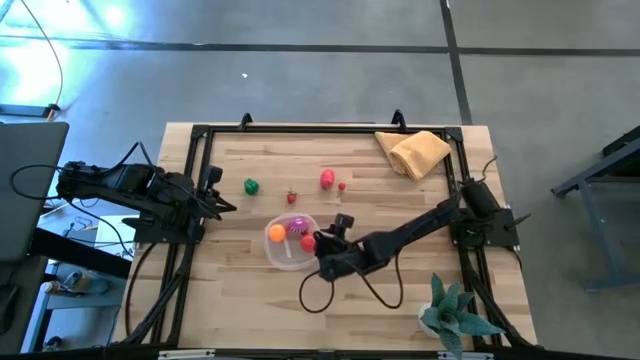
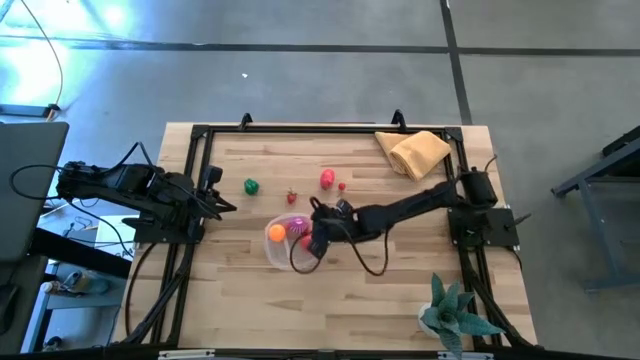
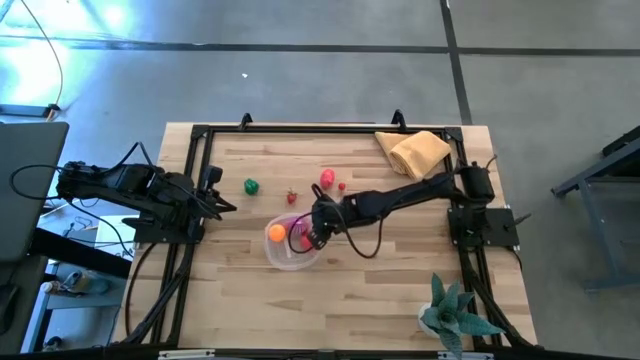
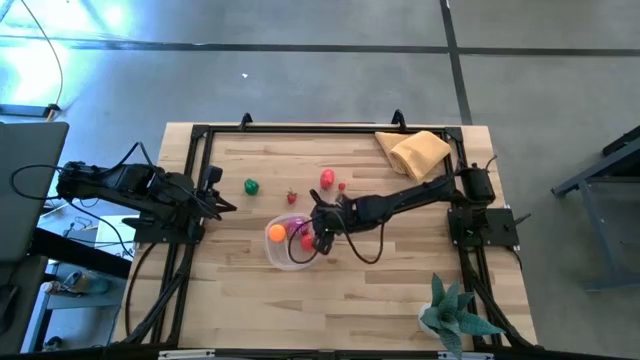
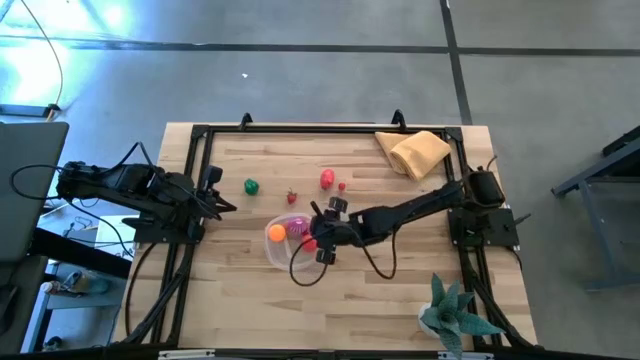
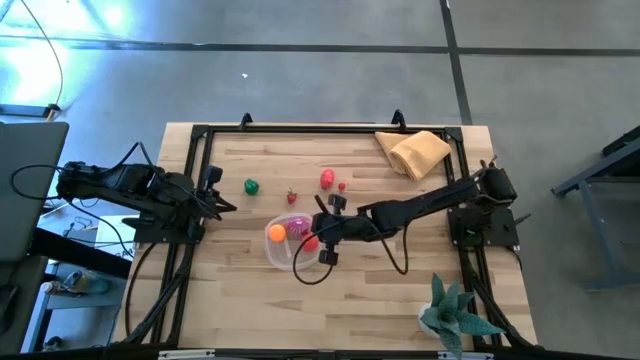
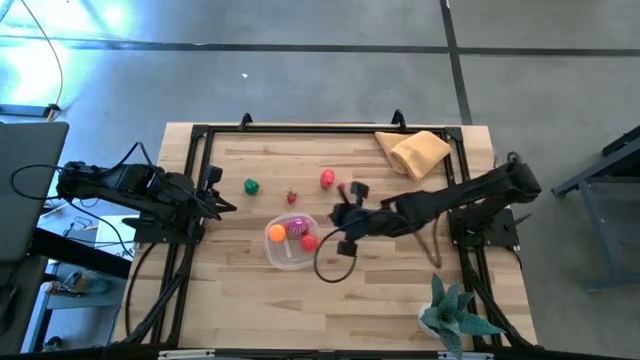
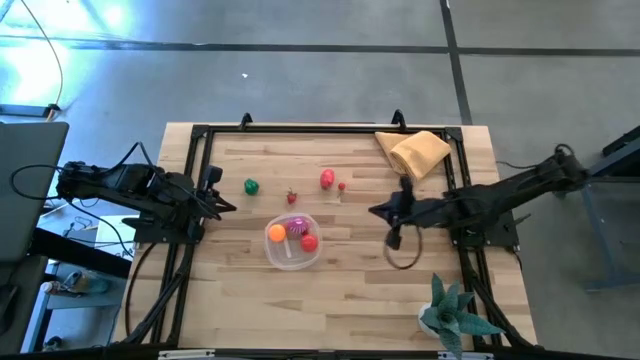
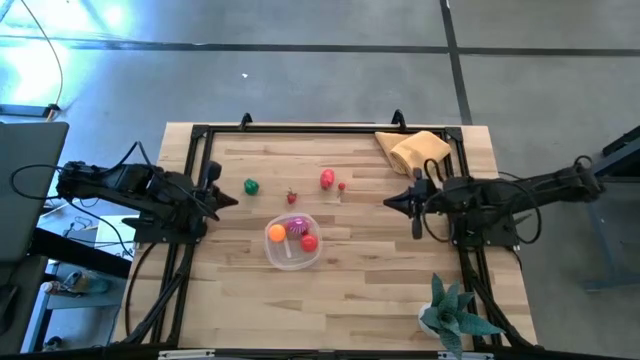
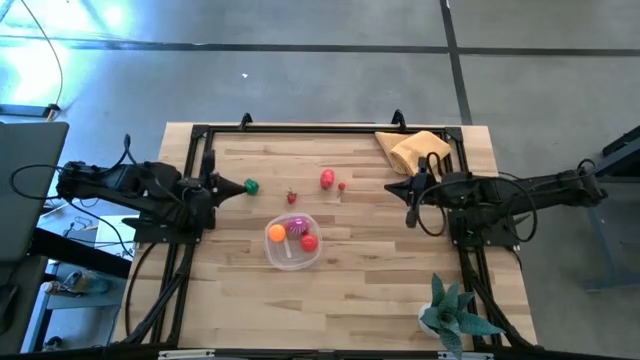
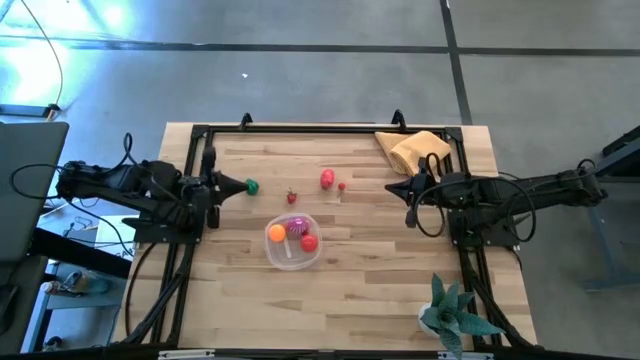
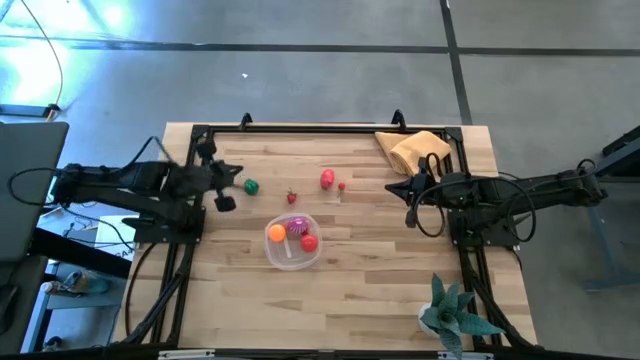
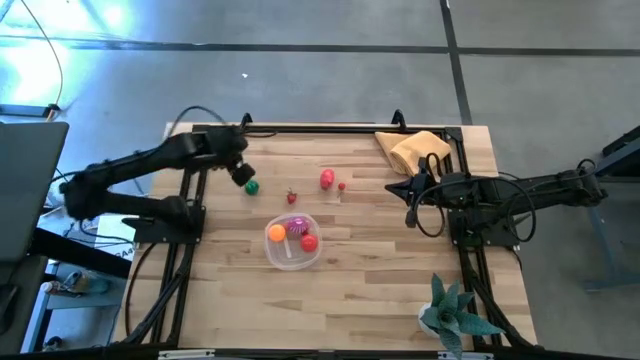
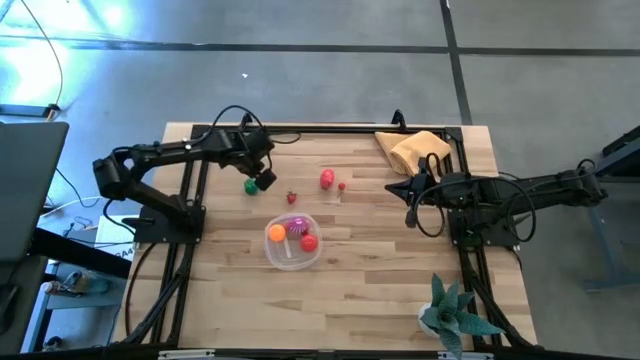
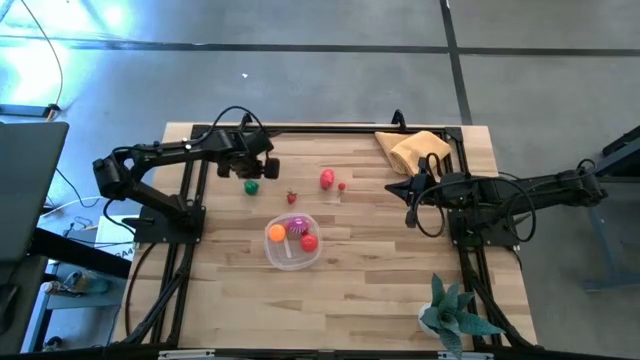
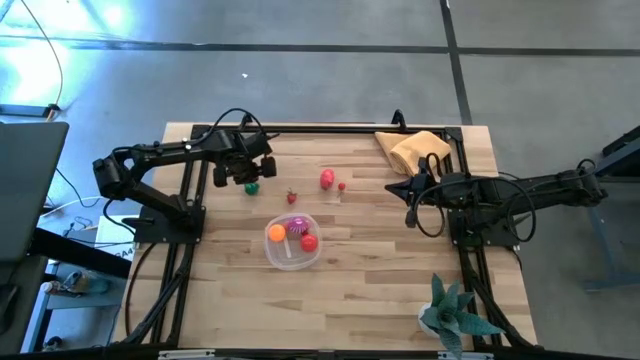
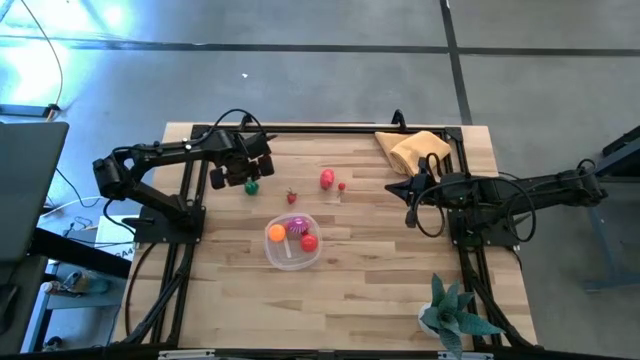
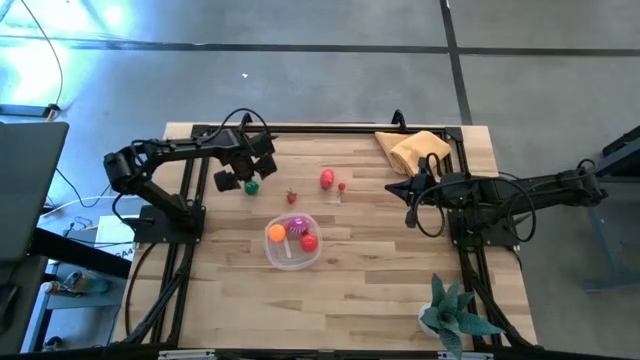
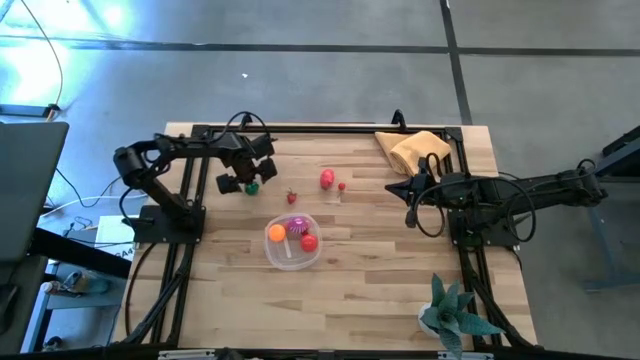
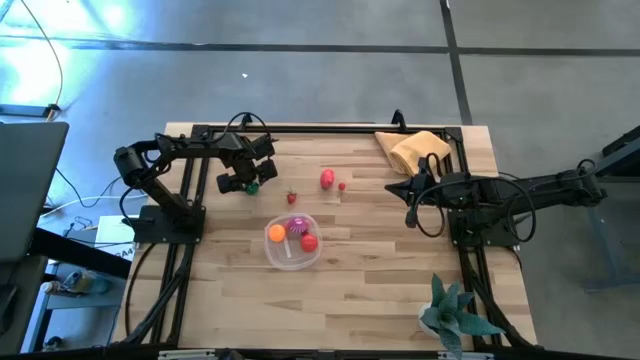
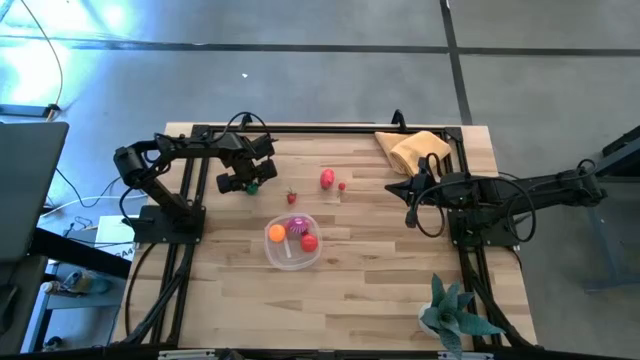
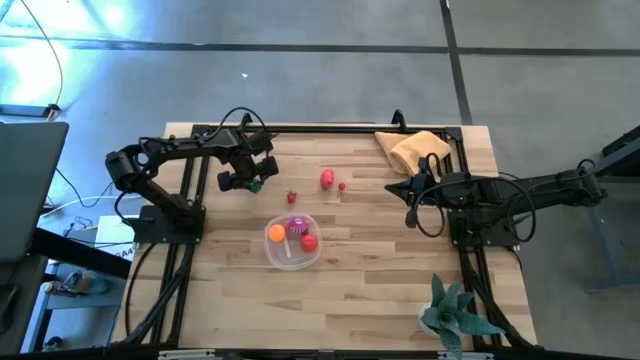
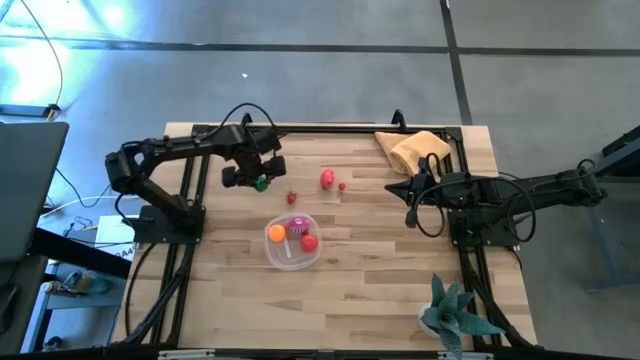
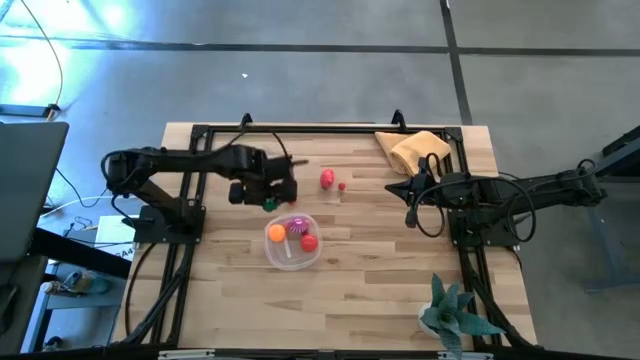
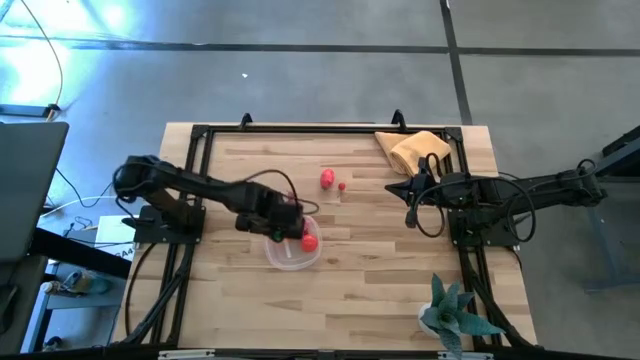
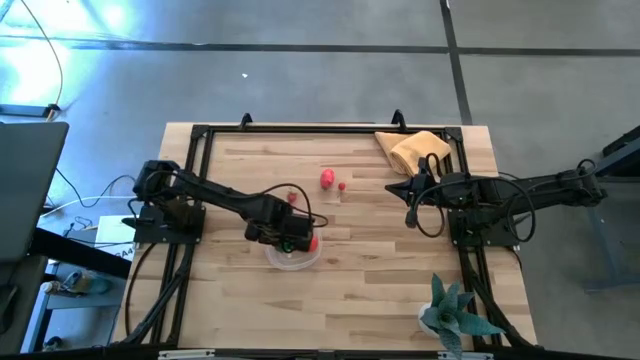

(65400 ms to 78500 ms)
Task: Pick and placing Produce into tupperware
Put the bell pepper into the transparent container

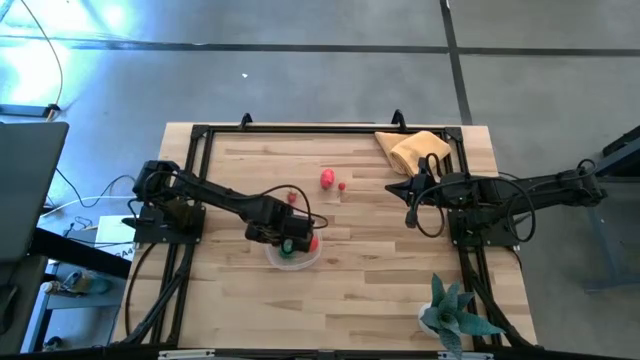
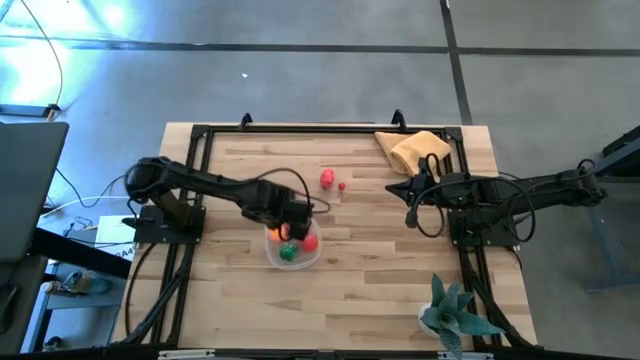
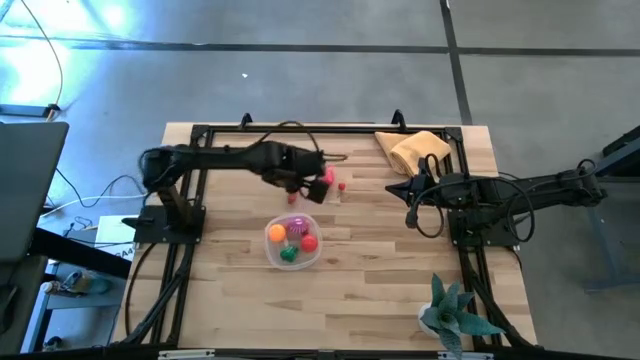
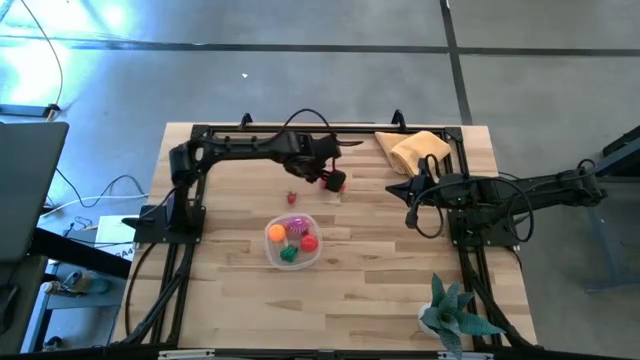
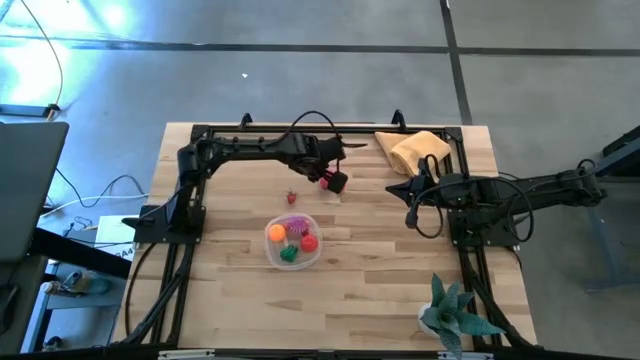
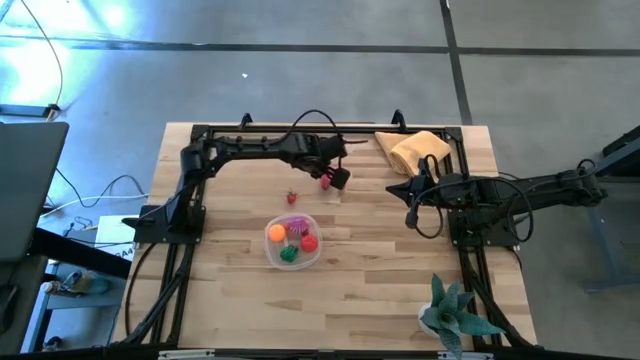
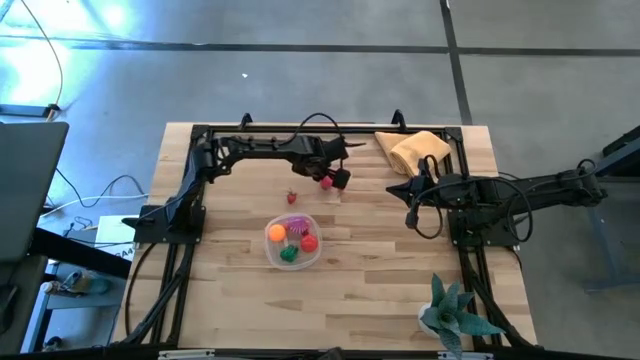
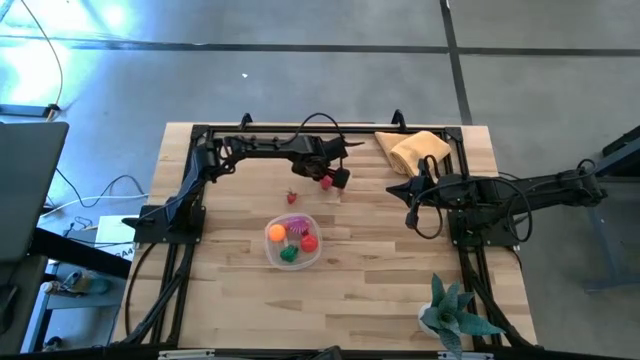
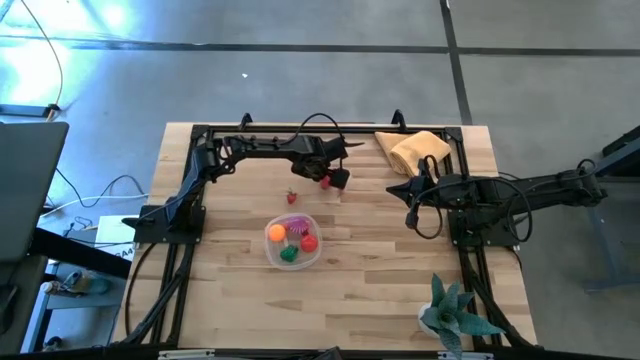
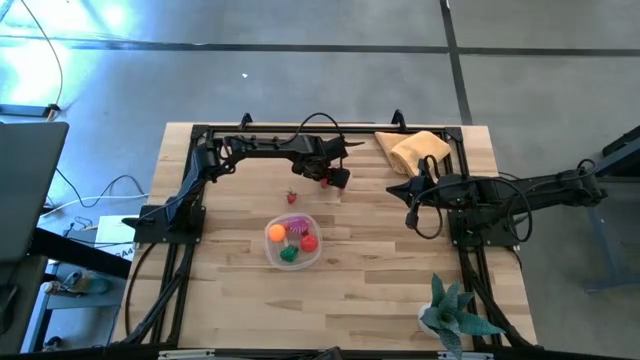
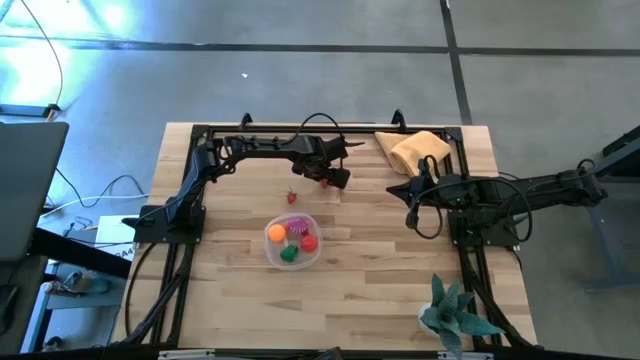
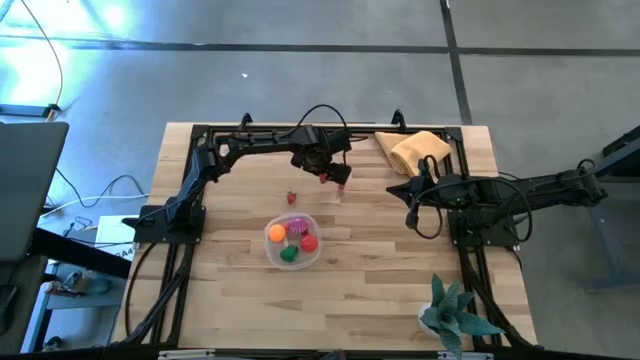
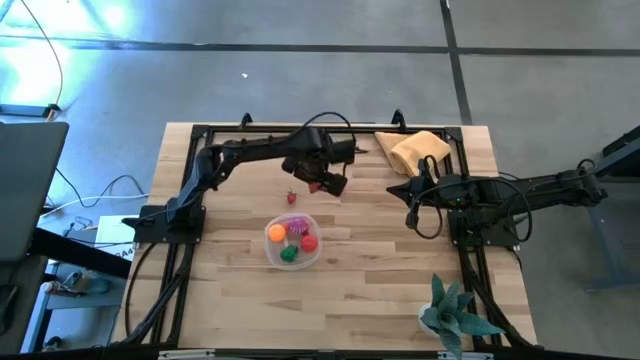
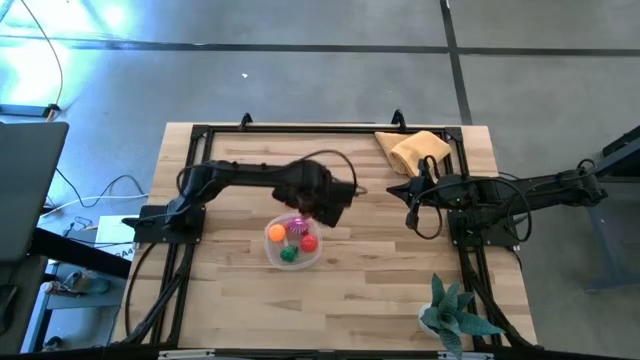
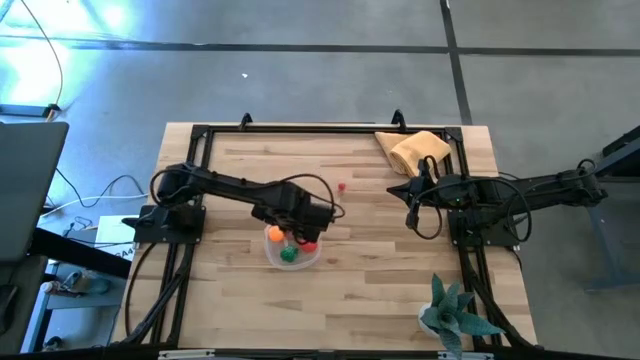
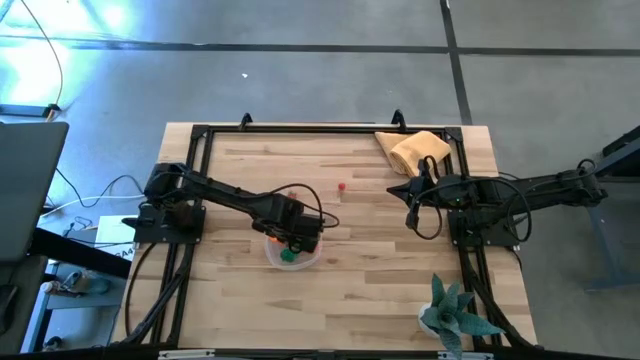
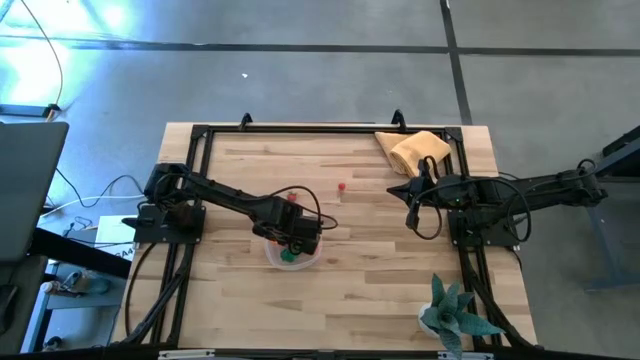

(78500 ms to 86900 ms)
Put the dragon fruit into the transparent container
